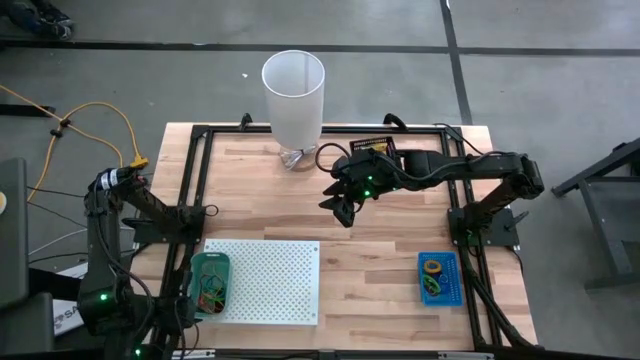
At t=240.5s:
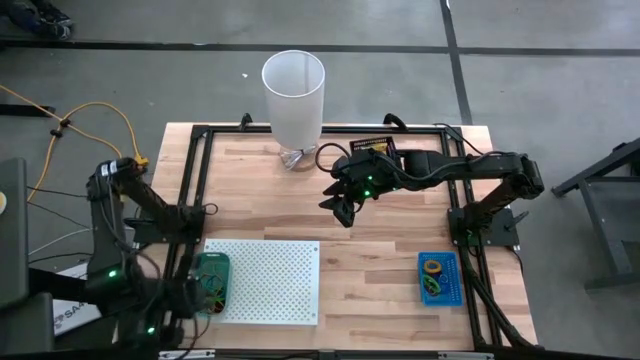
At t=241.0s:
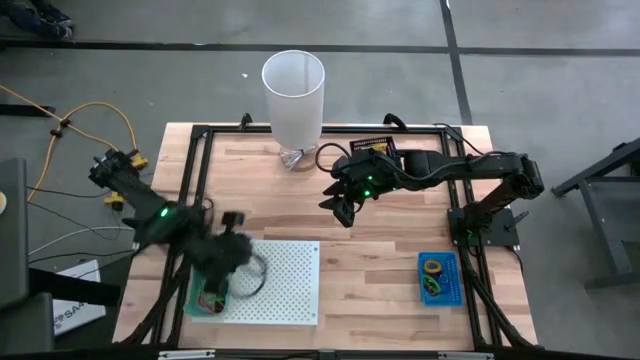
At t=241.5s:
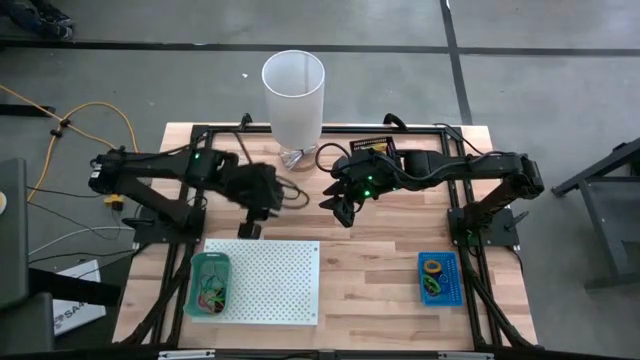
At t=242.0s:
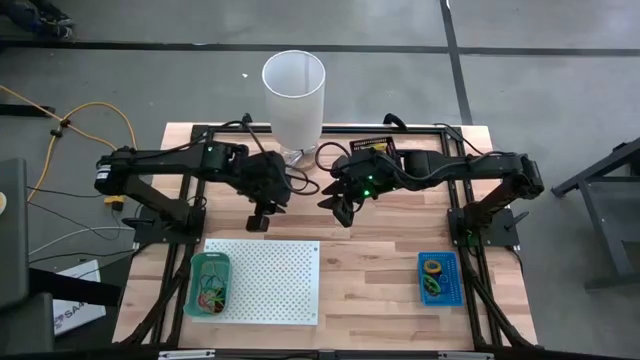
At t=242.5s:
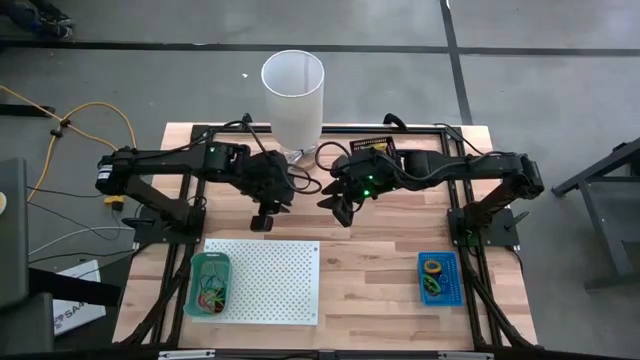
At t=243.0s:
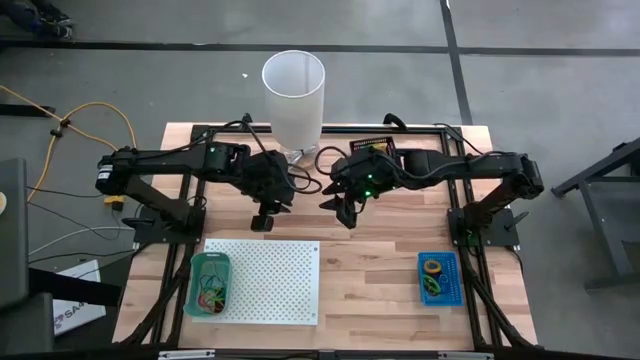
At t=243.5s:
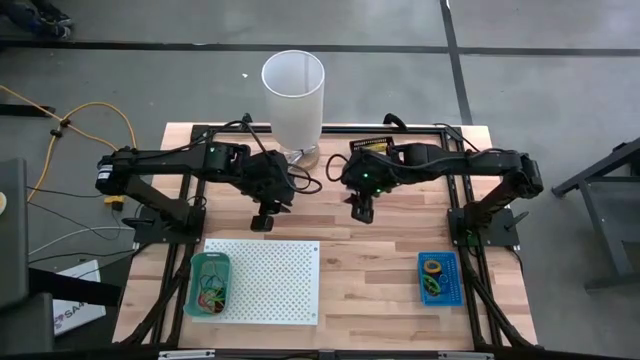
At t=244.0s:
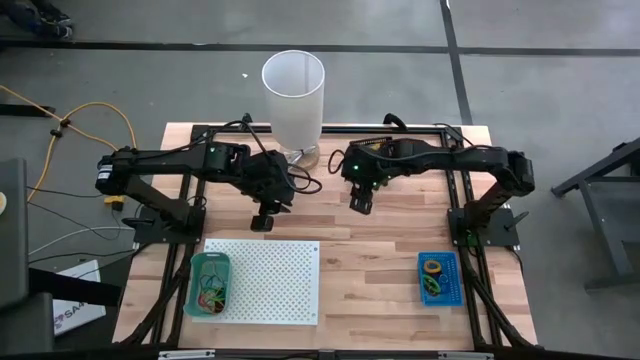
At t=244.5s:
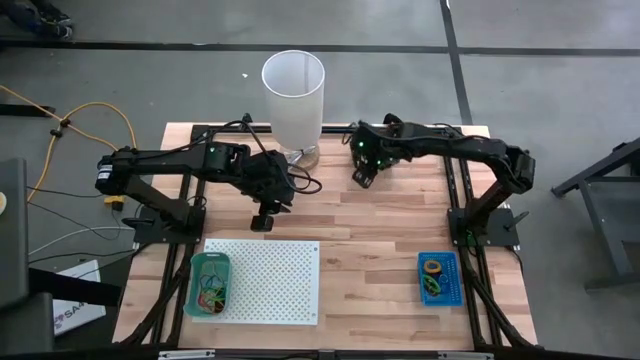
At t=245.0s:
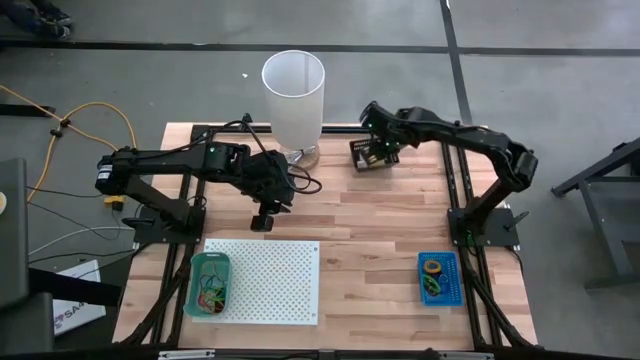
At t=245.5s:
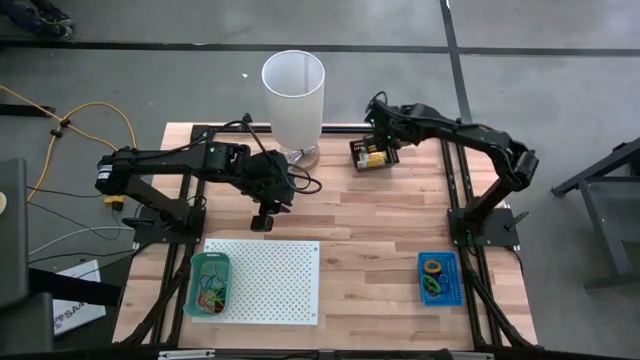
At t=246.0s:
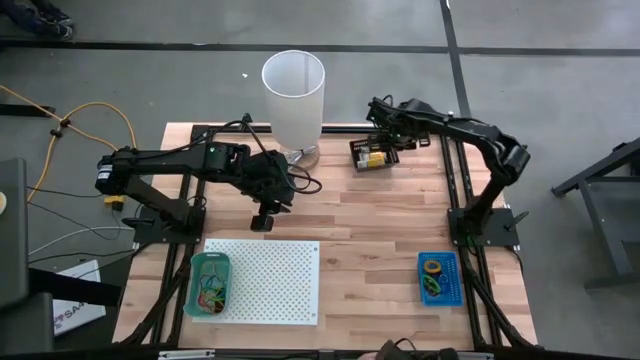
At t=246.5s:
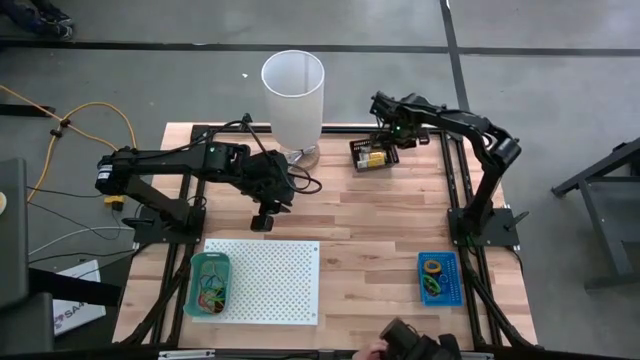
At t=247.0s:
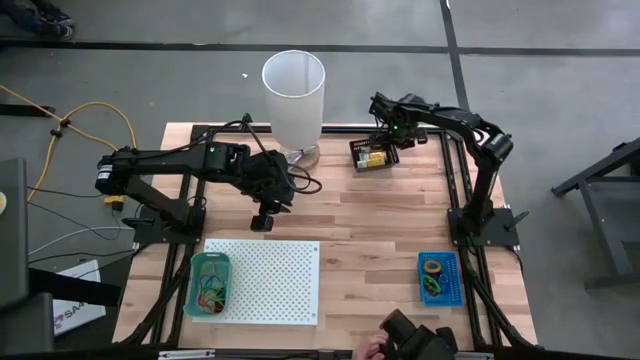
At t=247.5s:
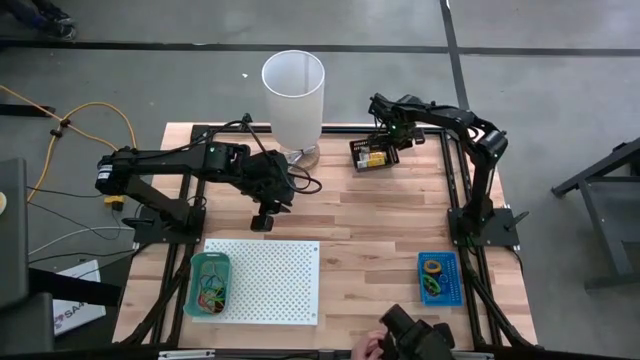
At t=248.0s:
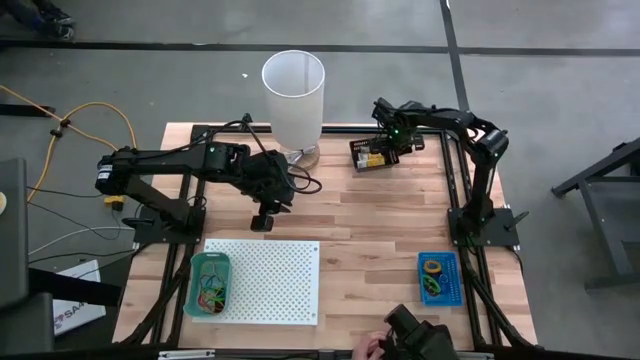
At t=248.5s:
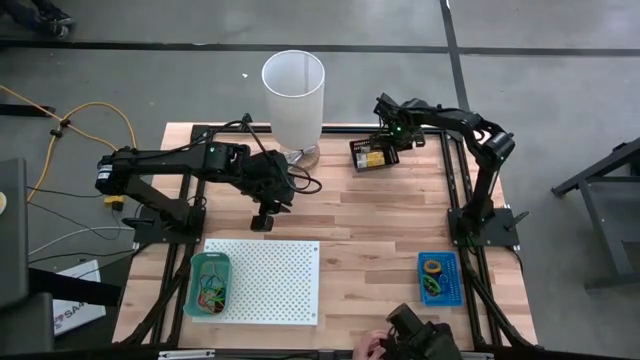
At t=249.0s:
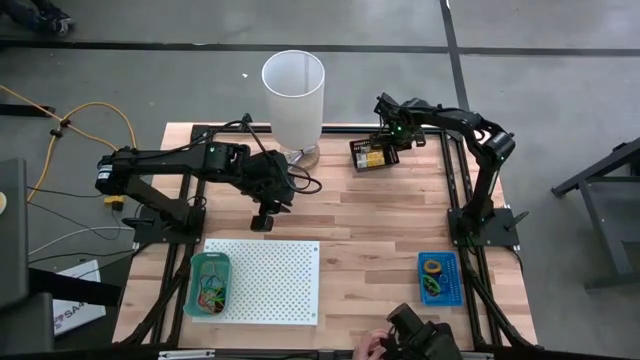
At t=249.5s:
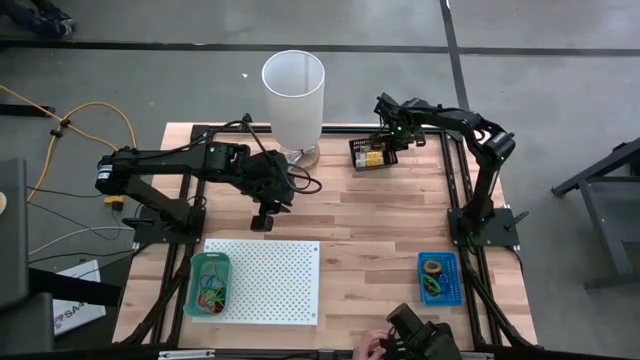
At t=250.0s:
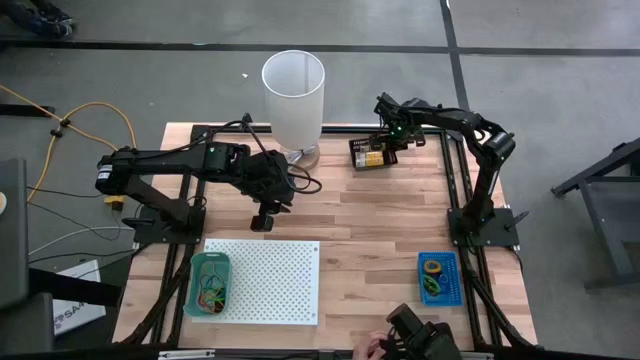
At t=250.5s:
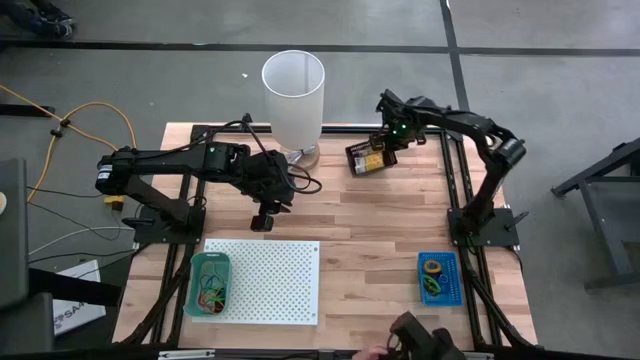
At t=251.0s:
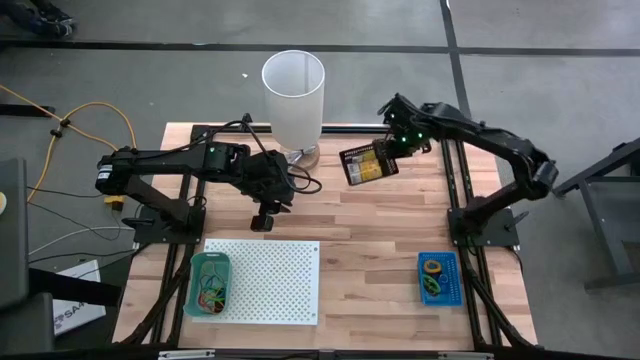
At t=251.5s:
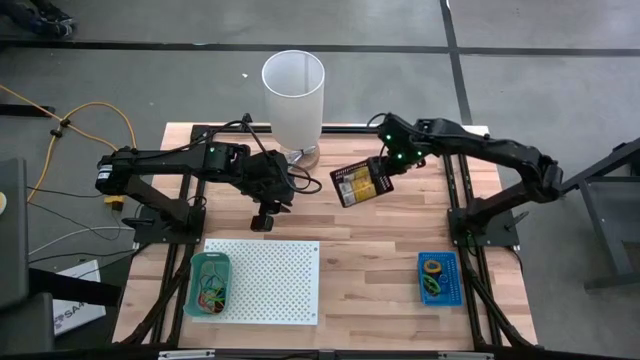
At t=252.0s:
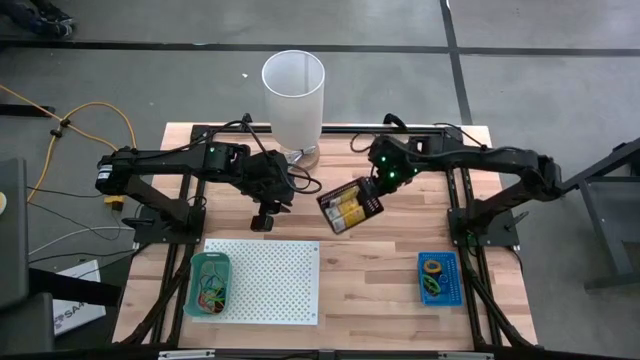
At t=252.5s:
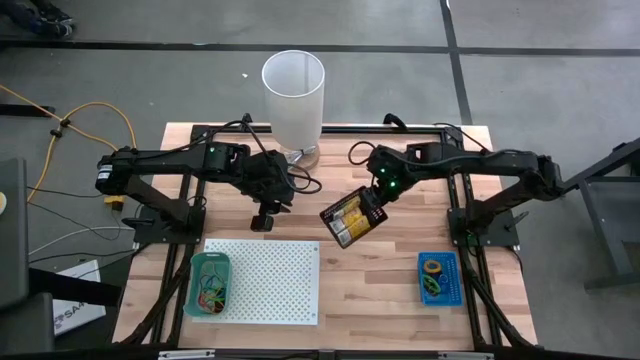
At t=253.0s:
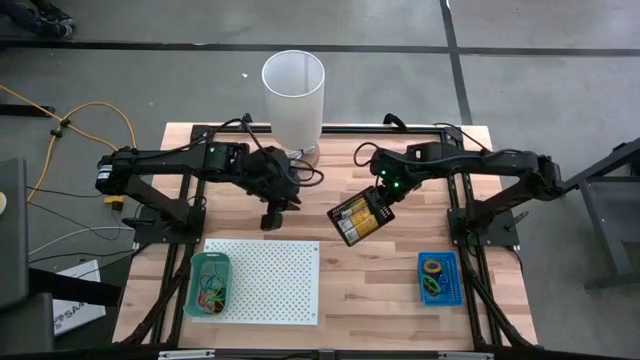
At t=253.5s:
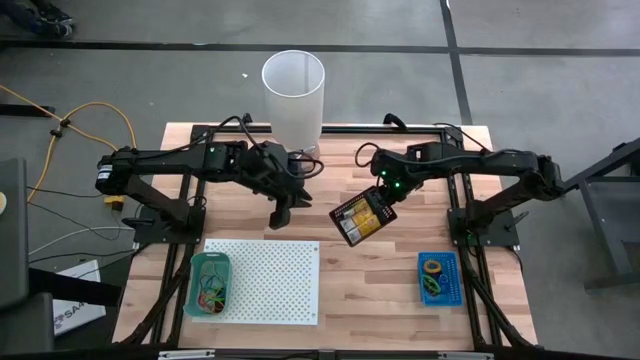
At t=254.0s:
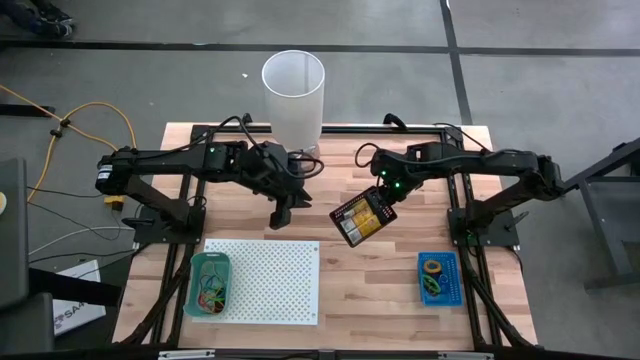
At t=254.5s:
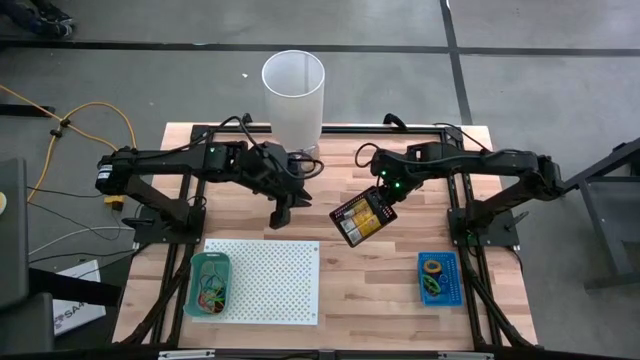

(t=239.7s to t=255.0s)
Task: Pick & Place Office Desk Supplies
Put the black bin on the shelf

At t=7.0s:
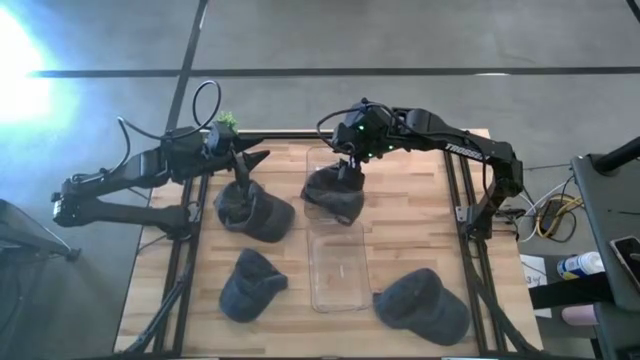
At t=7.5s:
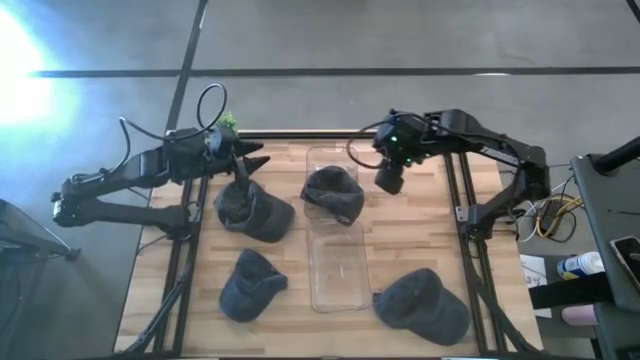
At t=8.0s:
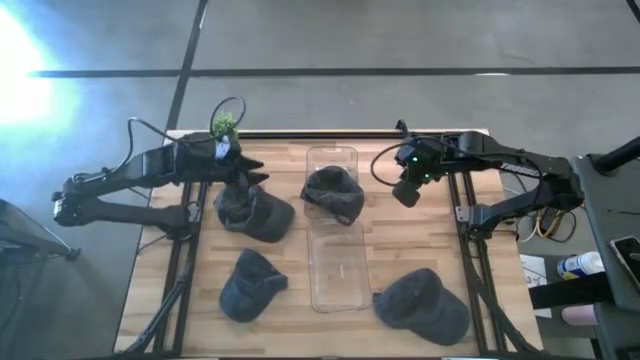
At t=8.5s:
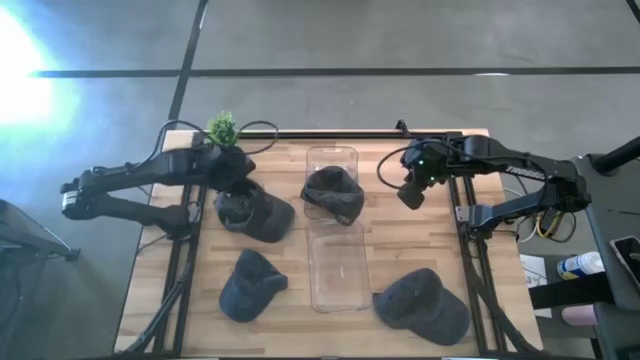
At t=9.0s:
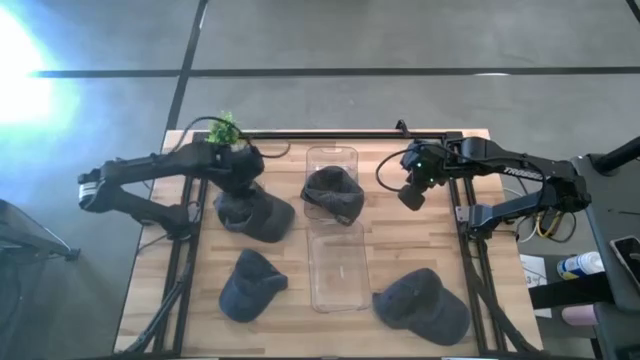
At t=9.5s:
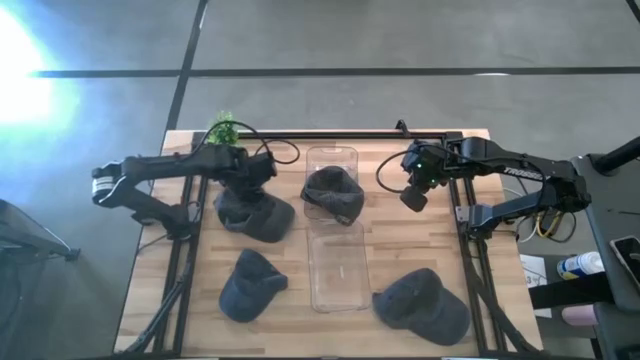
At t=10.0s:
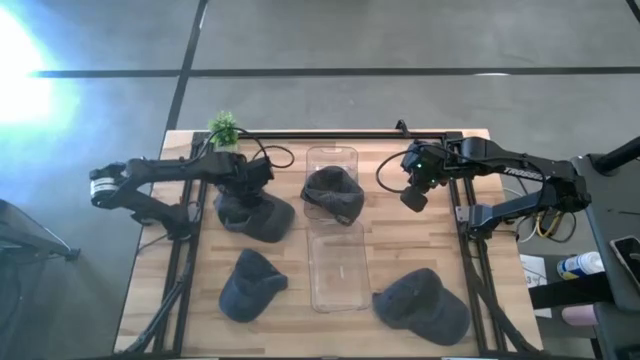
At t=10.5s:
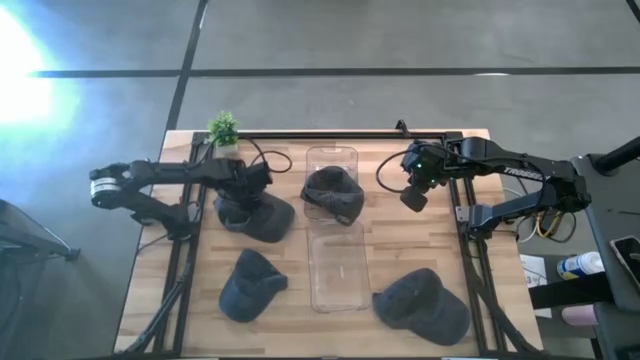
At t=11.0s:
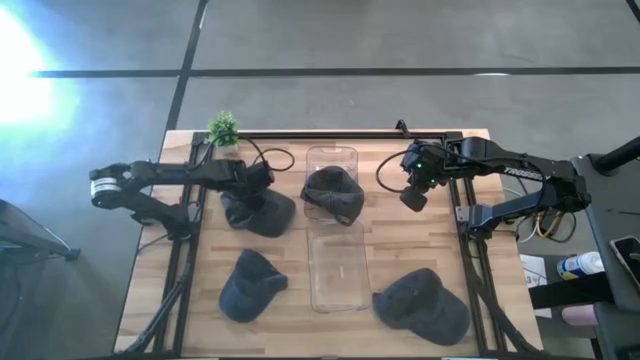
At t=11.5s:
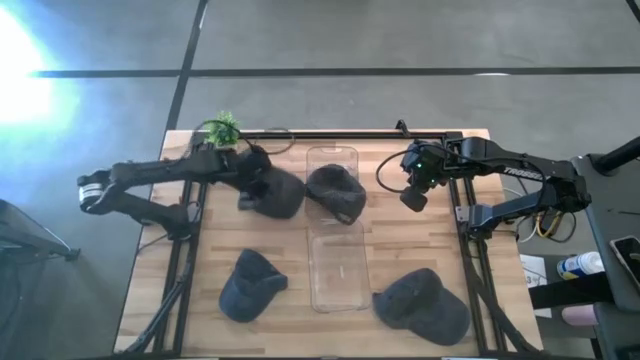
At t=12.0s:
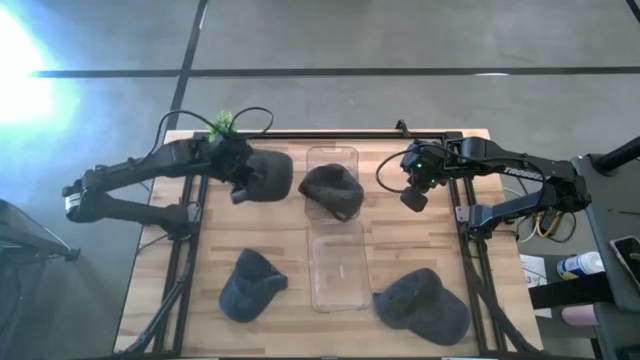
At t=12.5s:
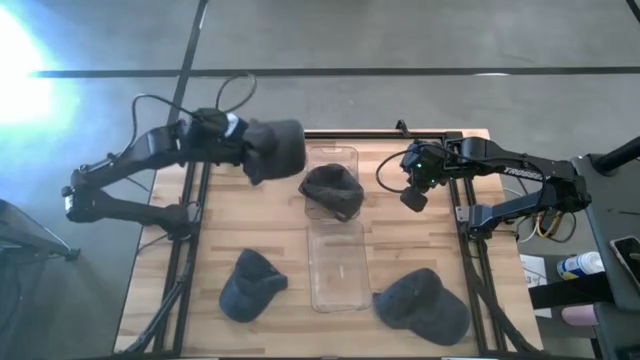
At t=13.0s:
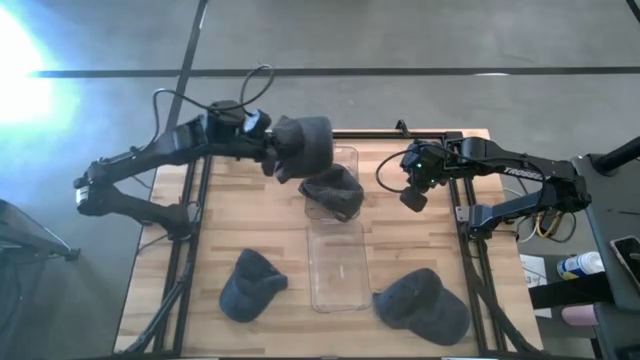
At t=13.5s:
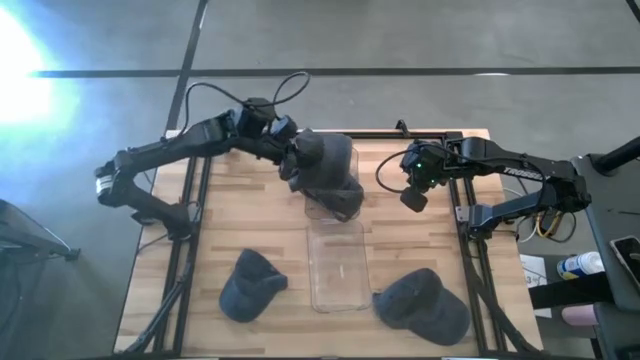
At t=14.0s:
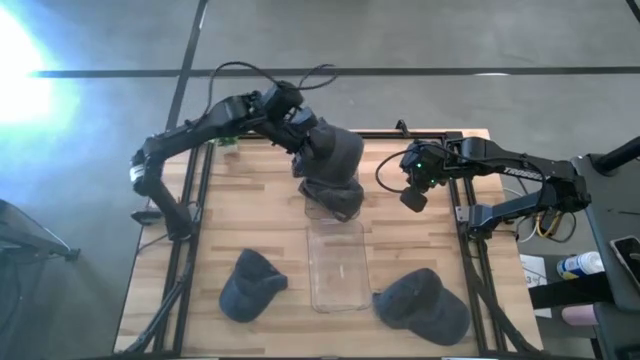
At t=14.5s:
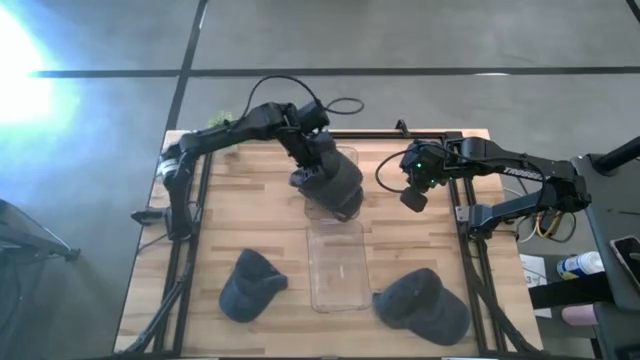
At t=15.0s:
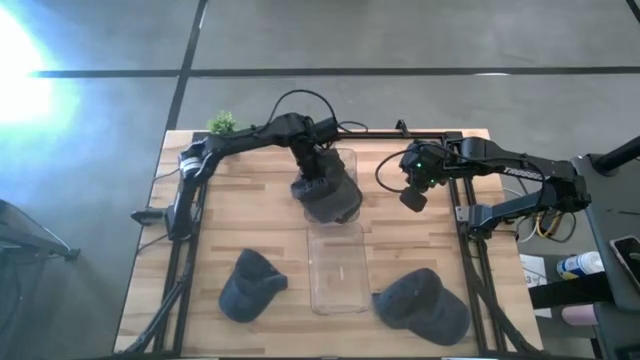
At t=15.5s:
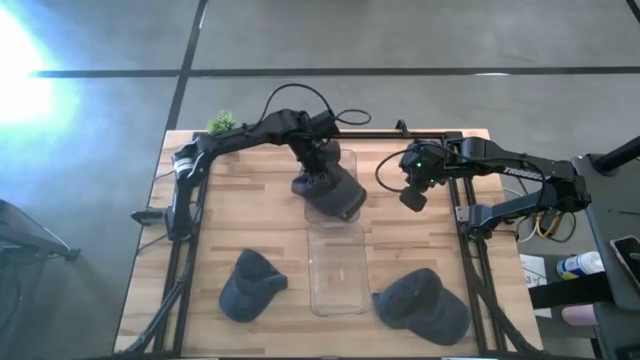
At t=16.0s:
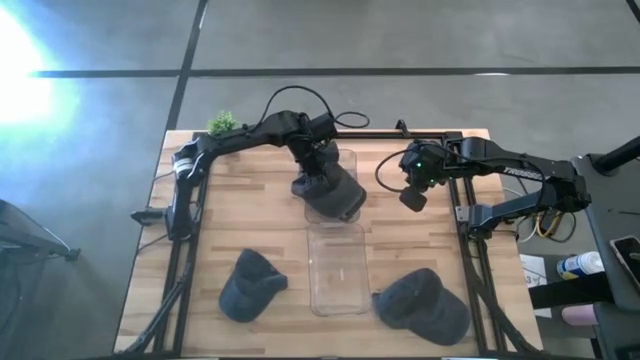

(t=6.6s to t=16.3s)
Task: Pick & Place hat
Put the gray cap into the top transparent bin
